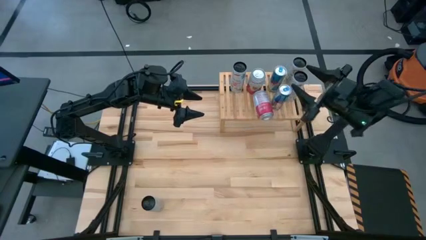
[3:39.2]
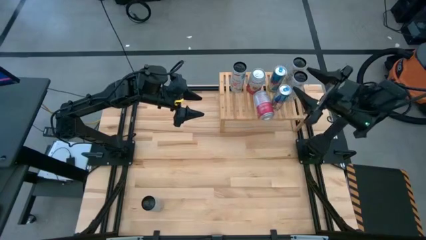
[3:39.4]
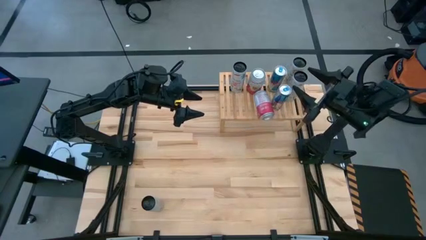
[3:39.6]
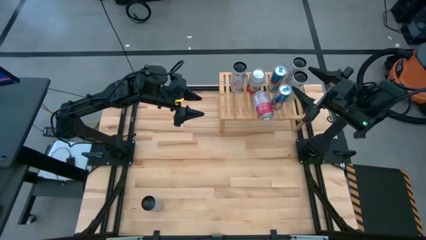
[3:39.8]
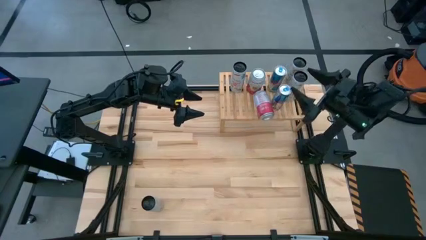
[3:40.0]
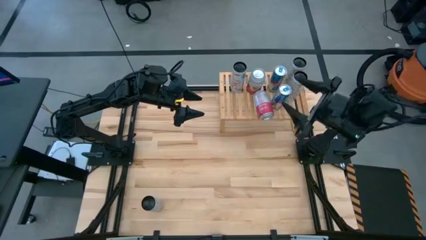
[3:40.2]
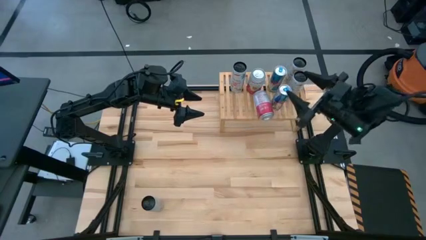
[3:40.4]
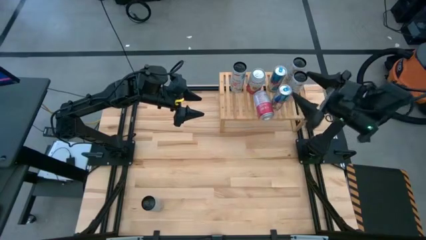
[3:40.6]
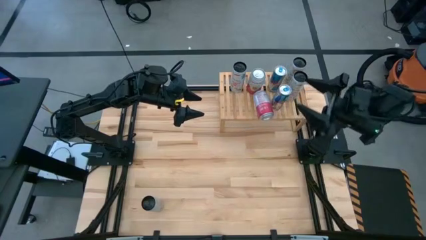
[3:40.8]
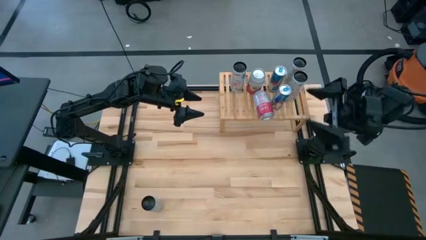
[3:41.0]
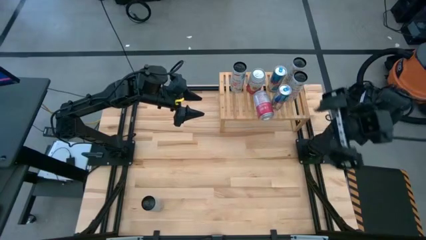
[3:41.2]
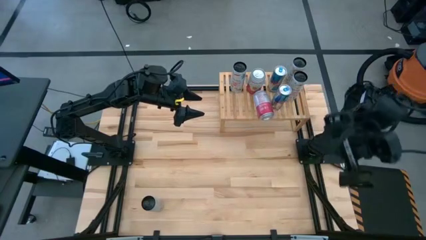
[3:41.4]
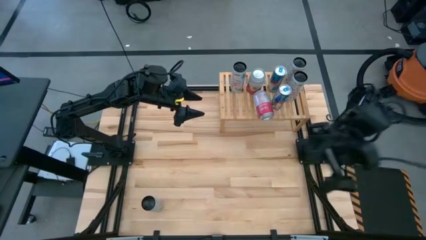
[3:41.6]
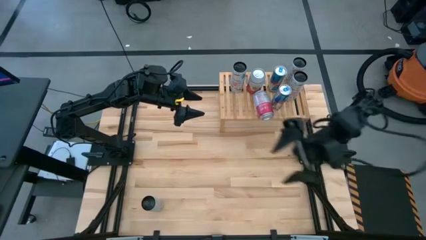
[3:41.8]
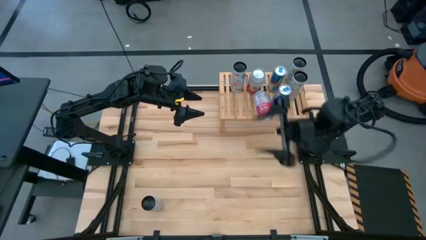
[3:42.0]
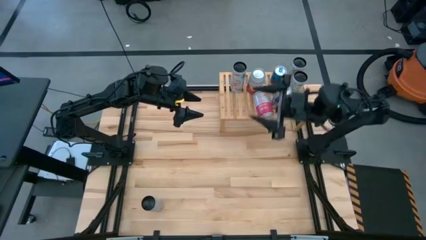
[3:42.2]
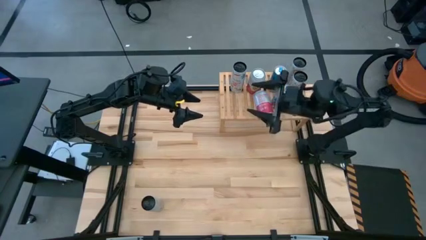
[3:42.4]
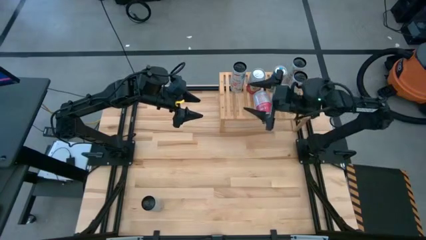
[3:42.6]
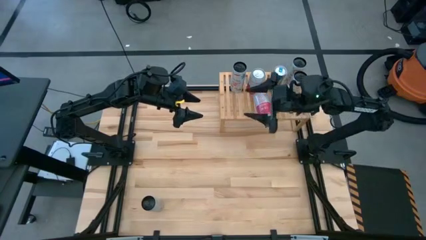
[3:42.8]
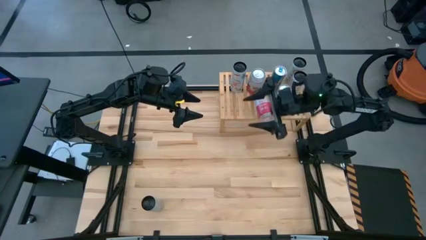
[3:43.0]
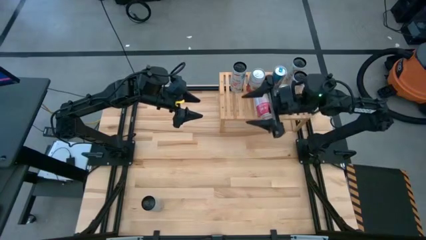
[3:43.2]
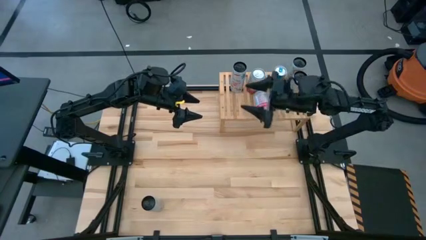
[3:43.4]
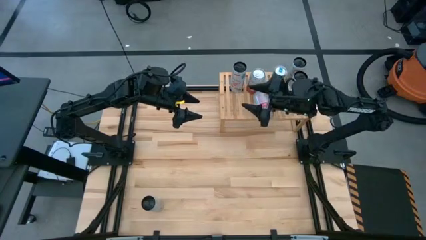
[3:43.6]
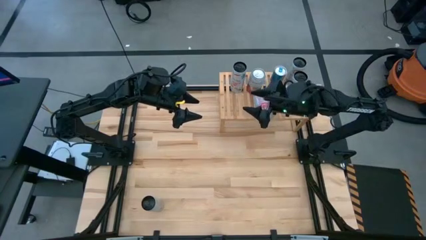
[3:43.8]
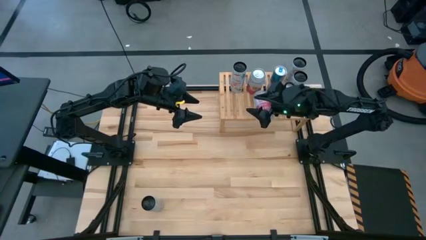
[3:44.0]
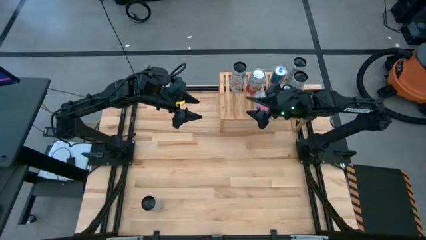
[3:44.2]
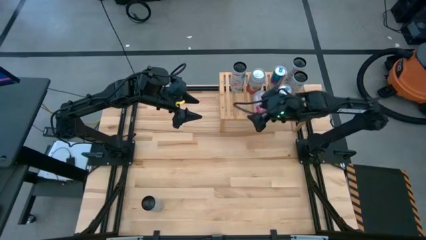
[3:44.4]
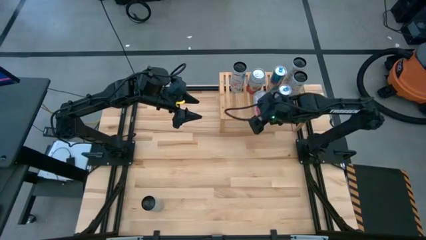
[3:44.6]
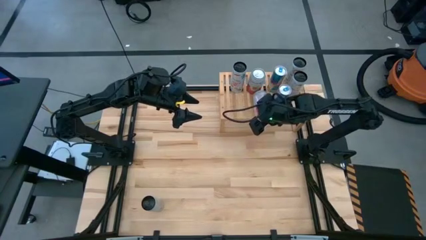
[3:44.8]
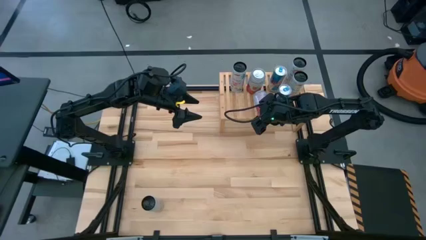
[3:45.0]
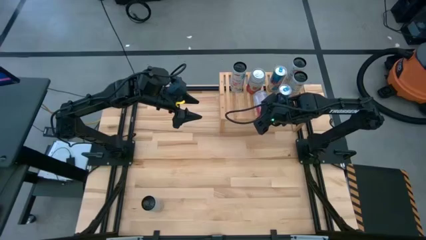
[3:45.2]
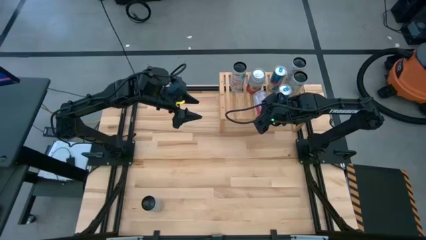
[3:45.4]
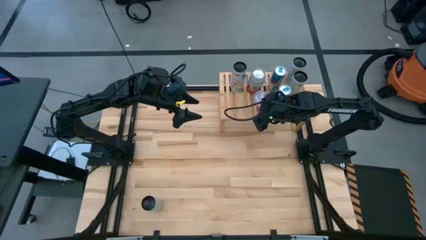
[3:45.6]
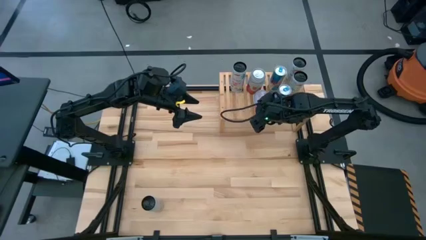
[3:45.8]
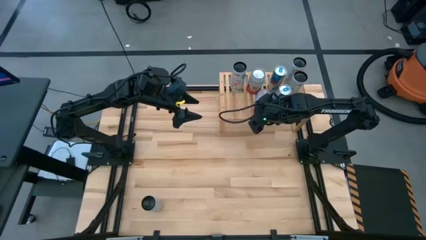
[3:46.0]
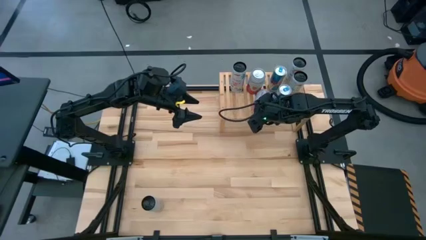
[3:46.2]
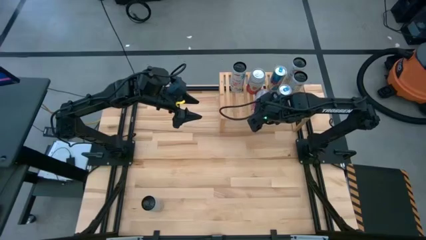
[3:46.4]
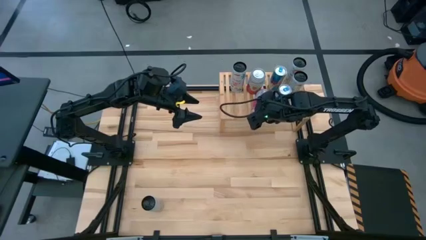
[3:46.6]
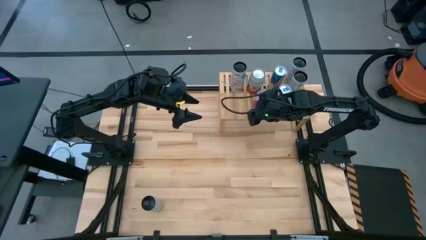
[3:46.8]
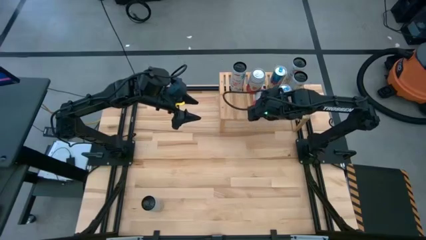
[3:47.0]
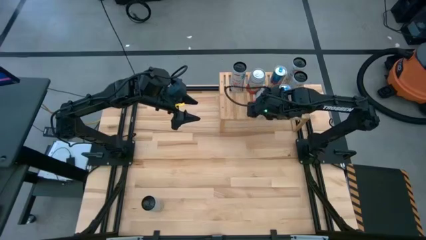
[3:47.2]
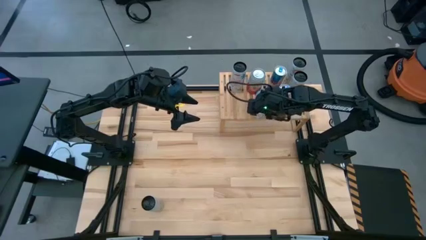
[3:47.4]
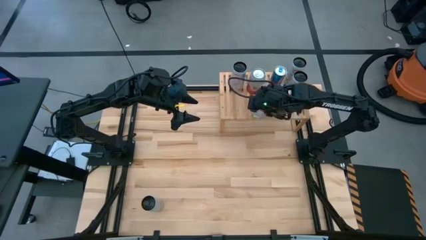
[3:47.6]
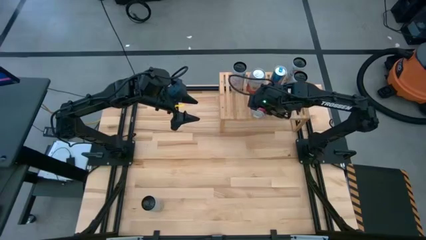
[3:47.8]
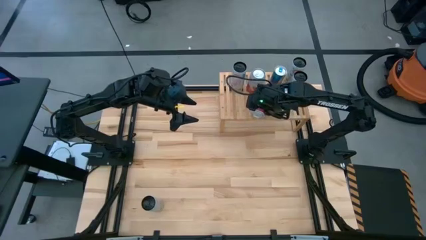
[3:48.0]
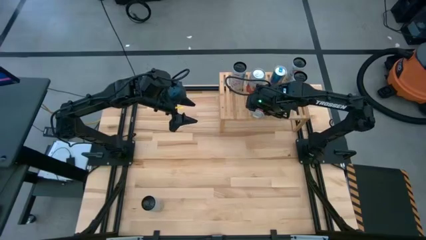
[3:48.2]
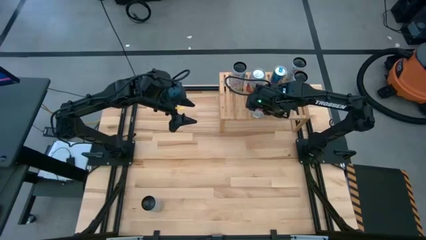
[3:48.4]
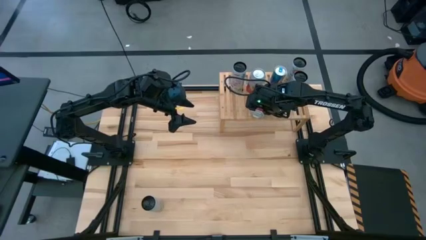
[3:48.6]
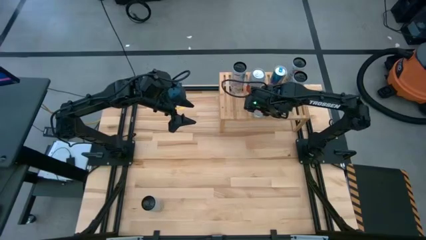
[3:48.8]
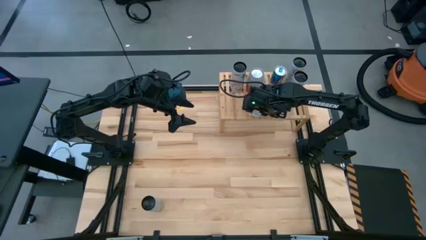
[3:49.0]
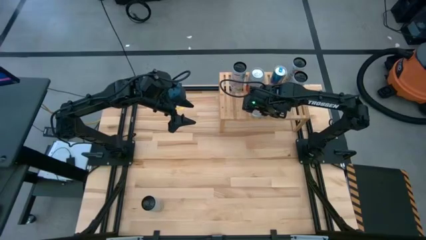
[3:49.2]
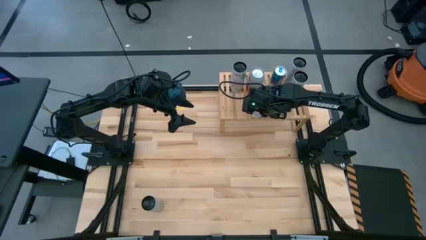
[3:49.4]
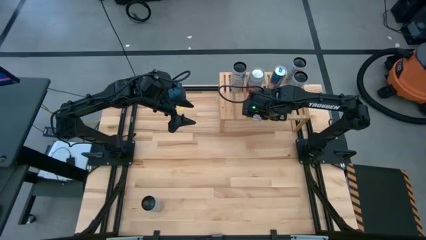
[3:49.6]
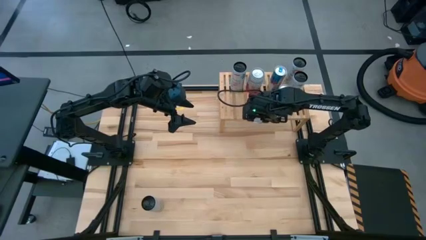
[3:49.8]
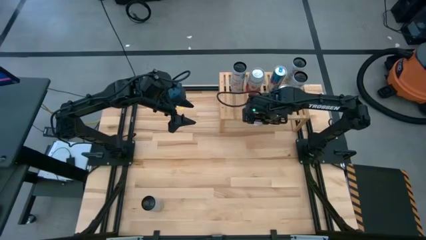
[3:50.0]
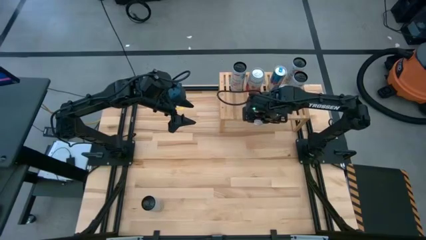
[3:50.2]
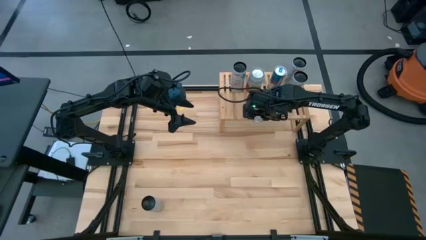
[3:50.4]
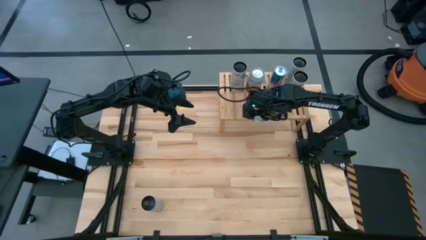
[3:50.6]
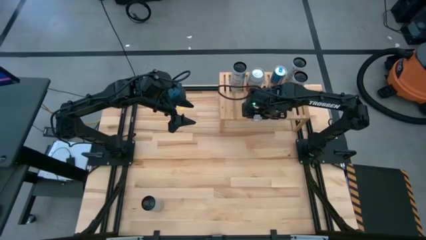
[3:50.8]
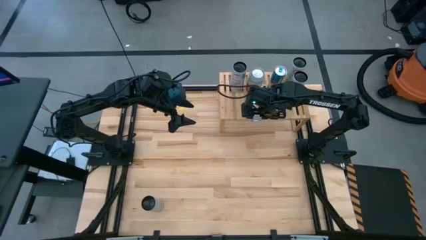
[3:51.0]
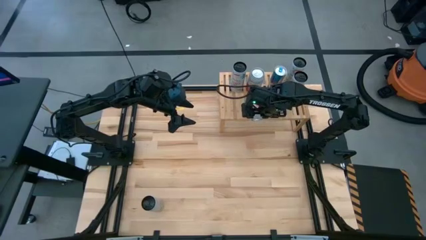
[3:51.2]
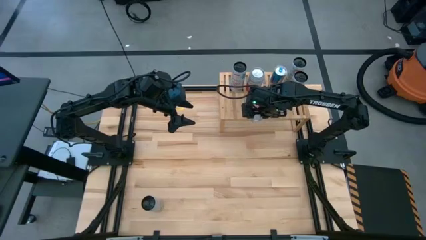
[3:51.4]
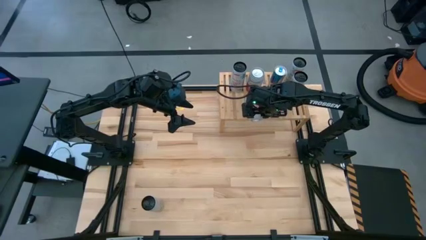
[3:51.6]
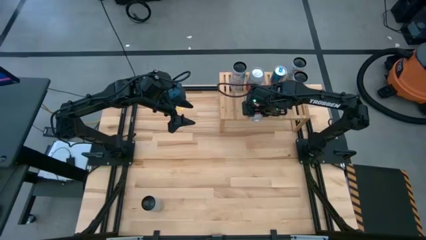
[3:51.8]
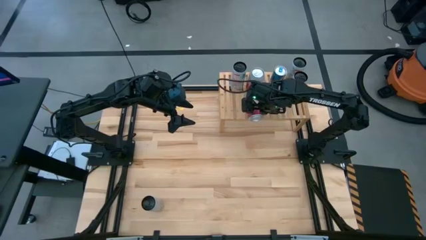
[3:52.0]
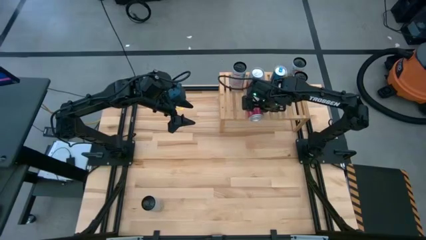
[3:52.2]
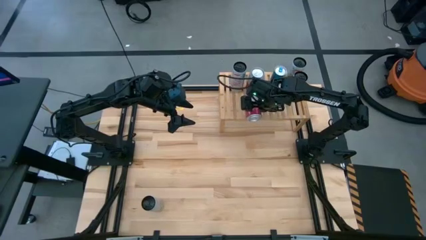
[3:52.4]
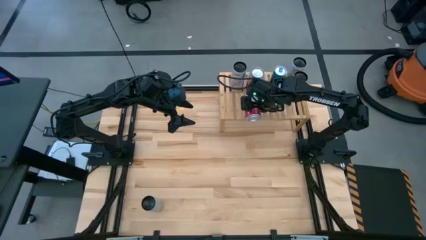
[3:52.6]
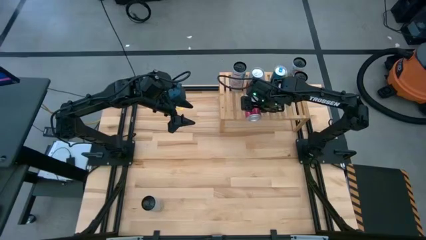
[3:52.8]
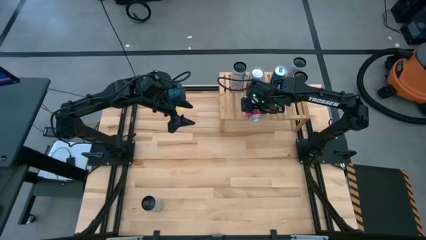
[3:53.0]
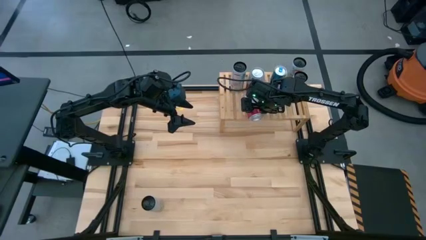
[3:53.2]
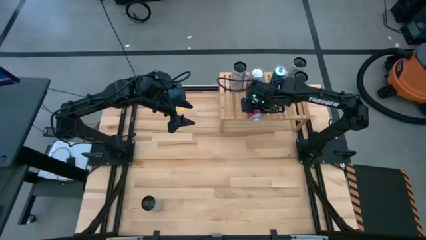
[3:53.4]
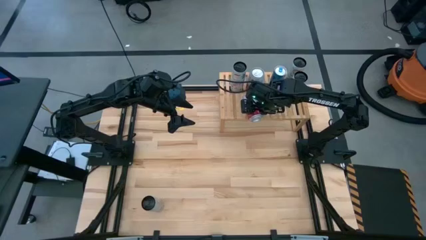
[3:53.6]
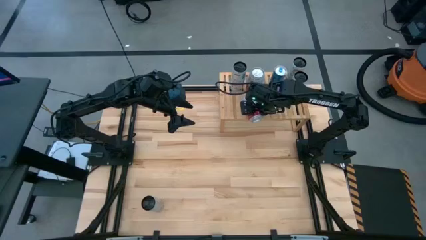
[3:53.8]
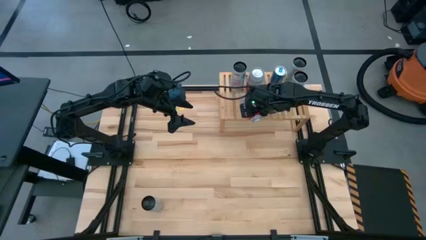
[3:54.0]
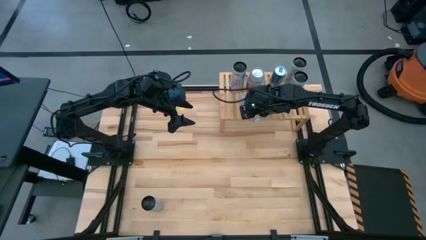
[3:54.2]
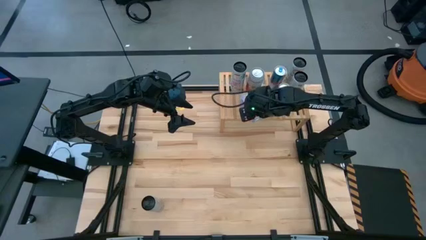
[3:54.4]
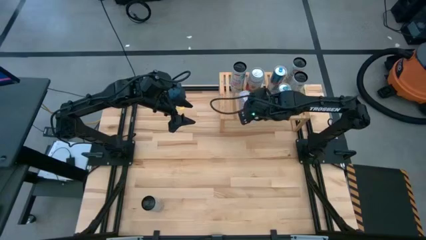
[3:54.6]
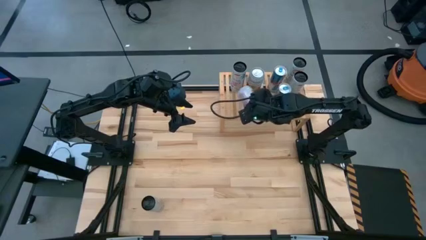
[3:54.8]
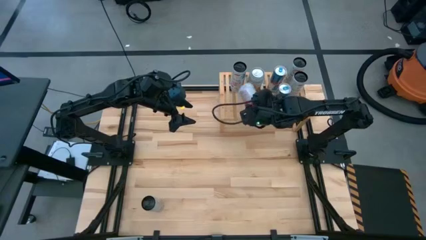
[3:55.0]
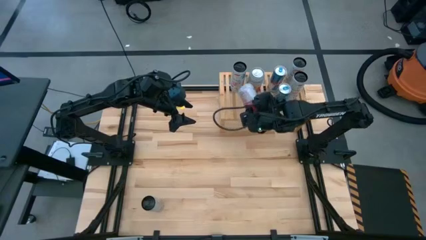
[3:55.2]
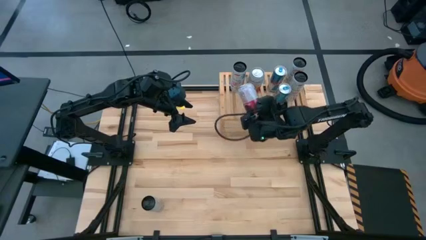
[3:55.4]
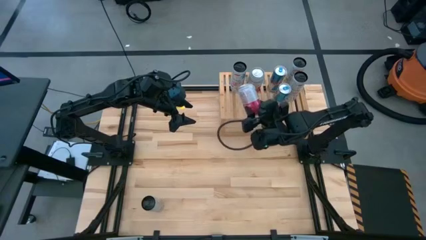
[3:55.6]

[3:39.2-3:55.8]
Task: Place canned beverage on shelf
Put the pink-white soda can on the shelf aligned with the other pink-white soda can
